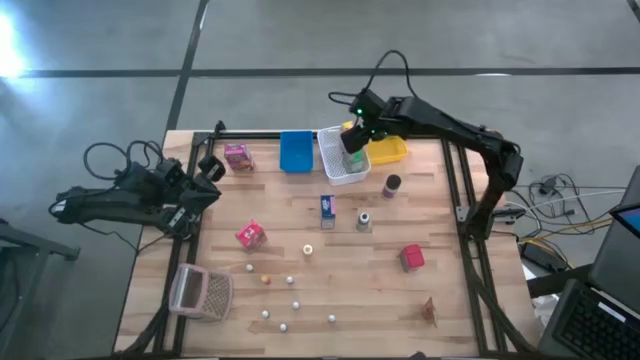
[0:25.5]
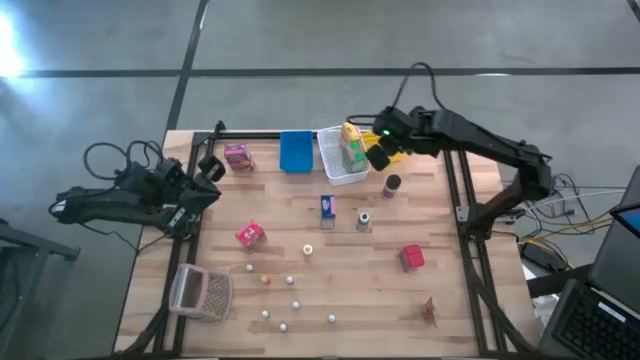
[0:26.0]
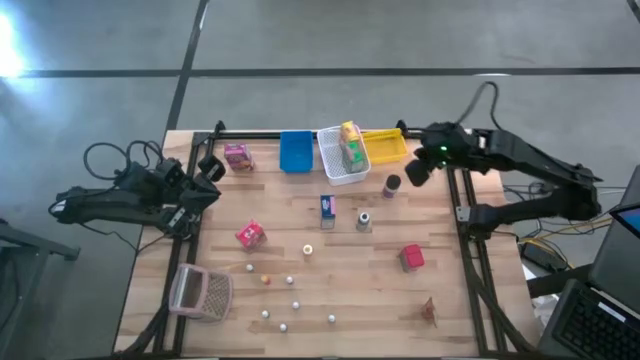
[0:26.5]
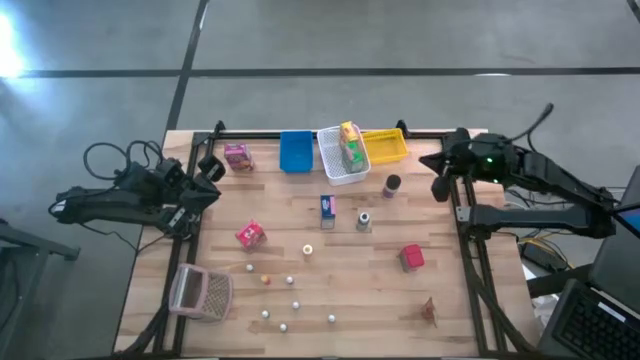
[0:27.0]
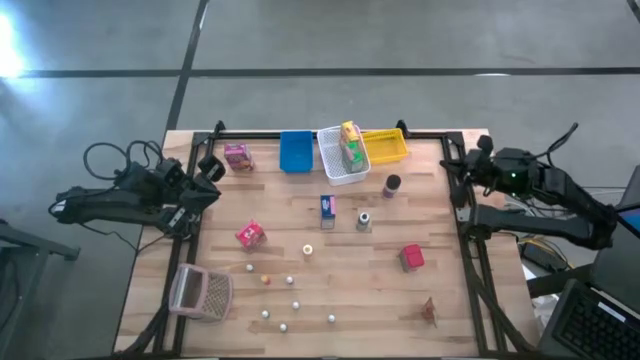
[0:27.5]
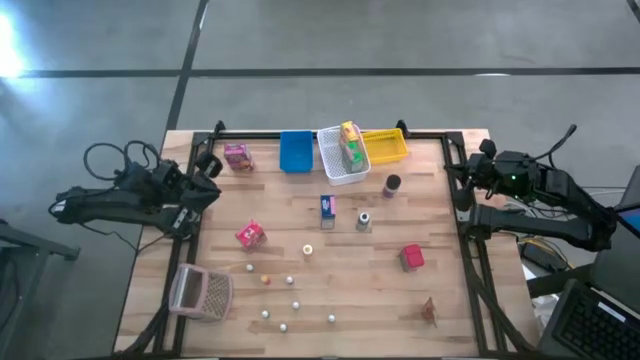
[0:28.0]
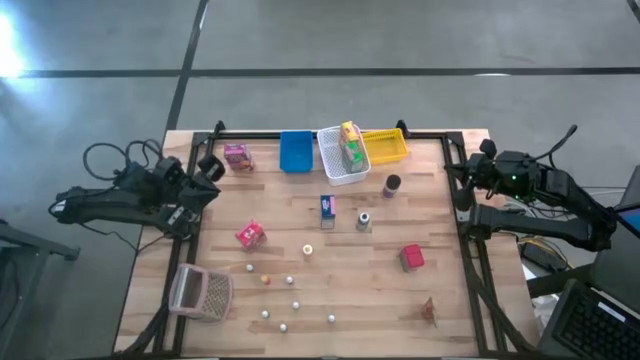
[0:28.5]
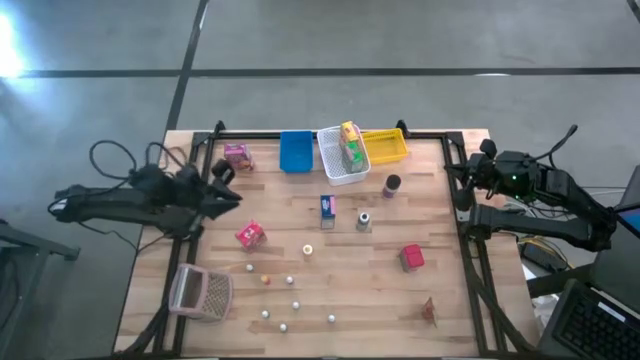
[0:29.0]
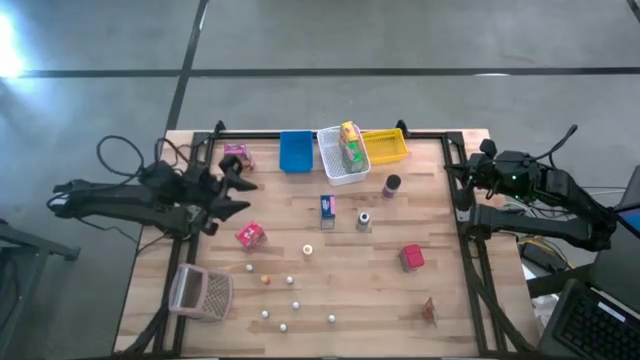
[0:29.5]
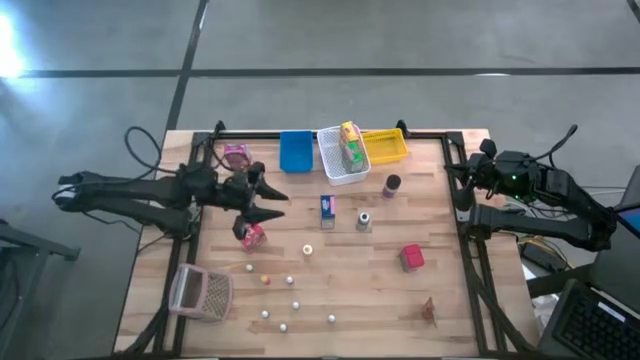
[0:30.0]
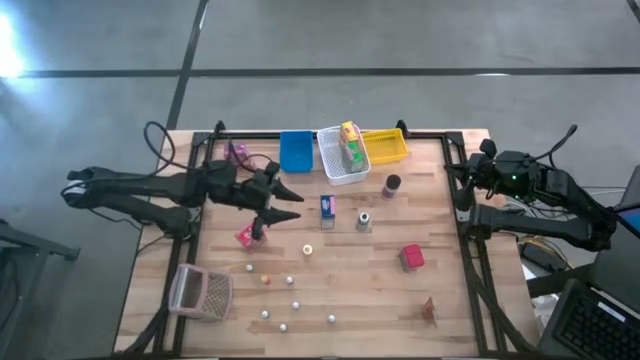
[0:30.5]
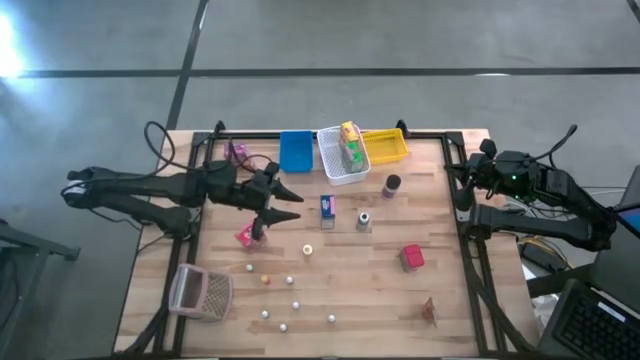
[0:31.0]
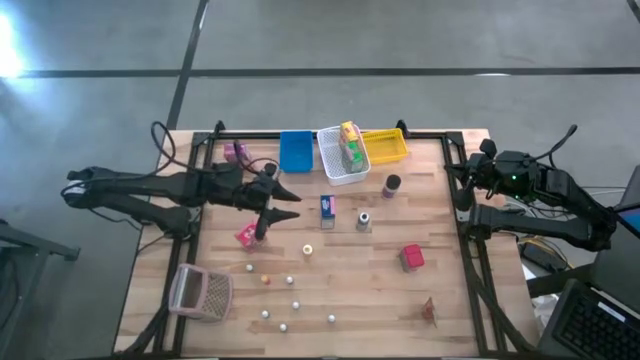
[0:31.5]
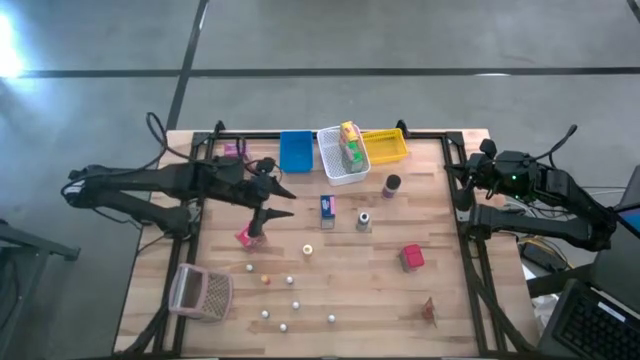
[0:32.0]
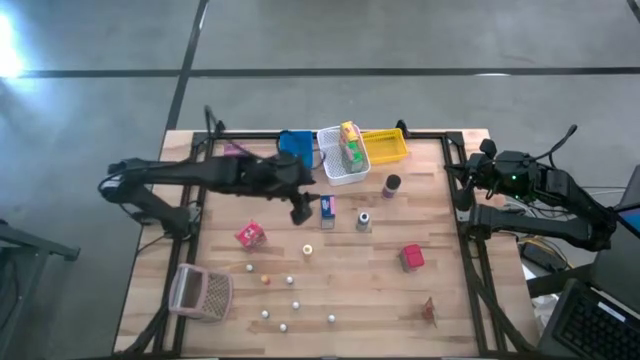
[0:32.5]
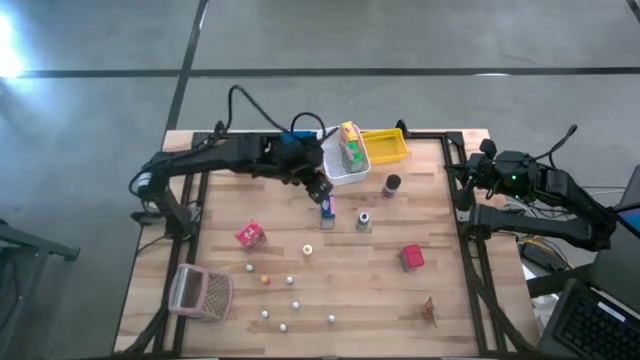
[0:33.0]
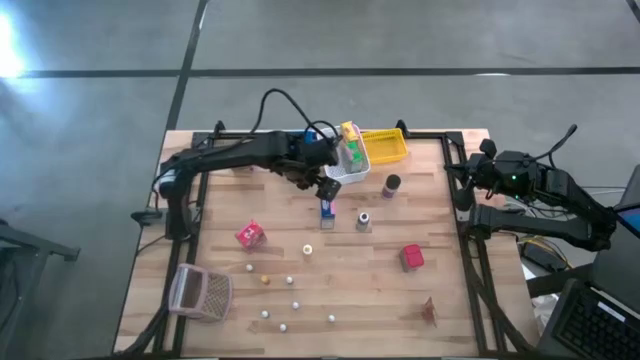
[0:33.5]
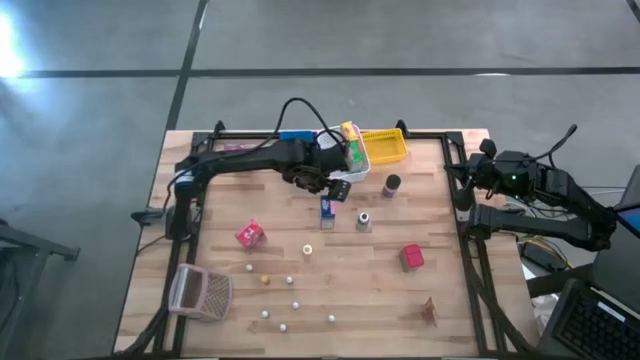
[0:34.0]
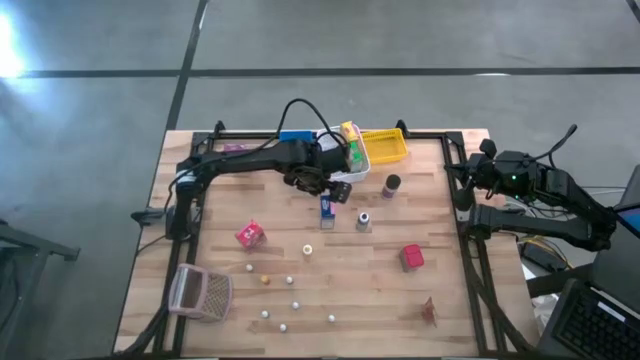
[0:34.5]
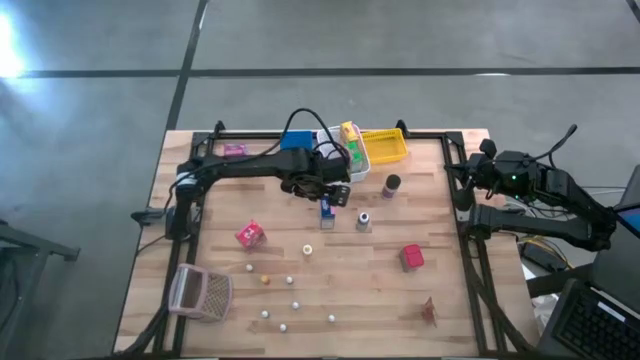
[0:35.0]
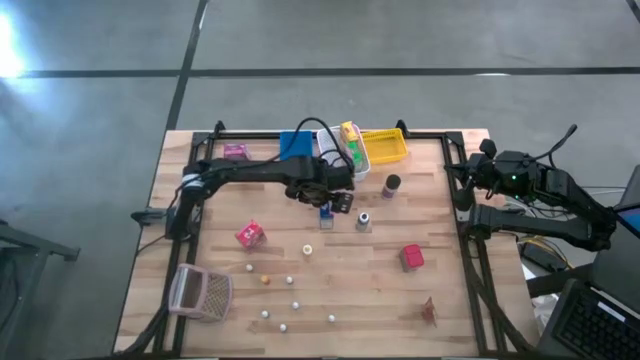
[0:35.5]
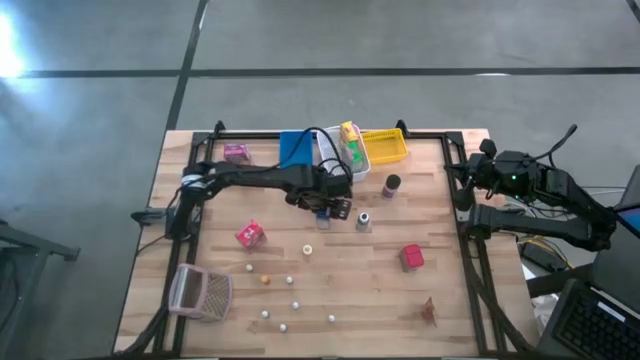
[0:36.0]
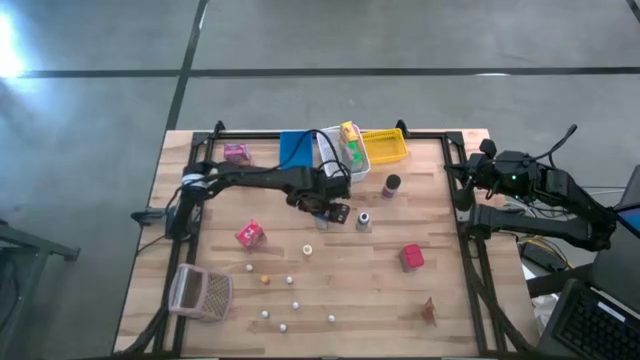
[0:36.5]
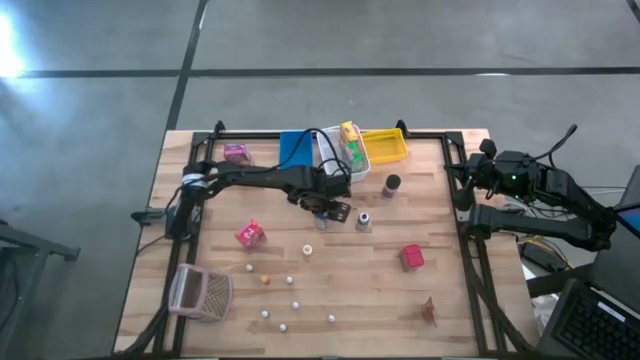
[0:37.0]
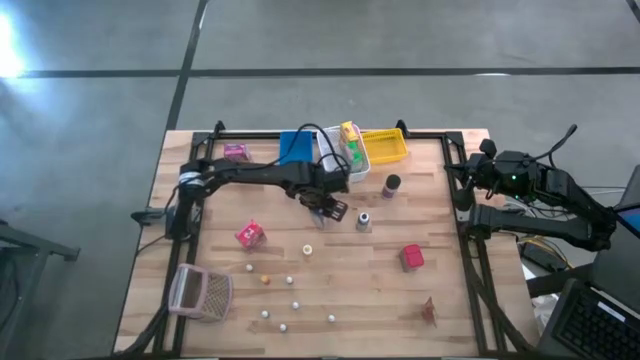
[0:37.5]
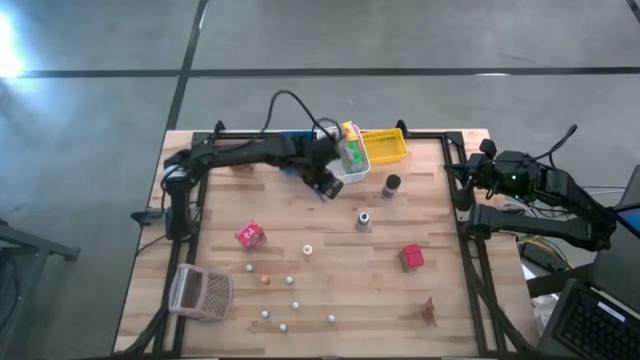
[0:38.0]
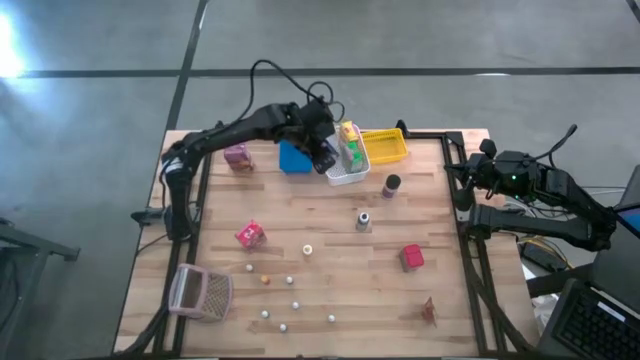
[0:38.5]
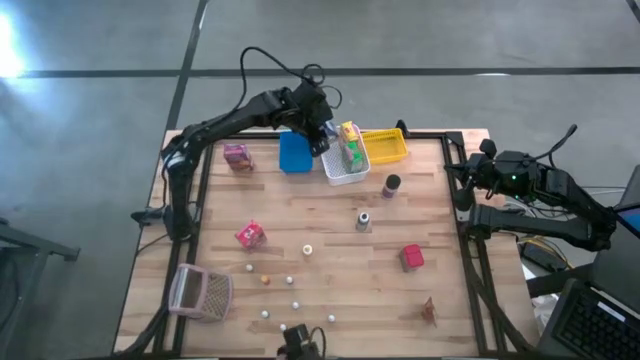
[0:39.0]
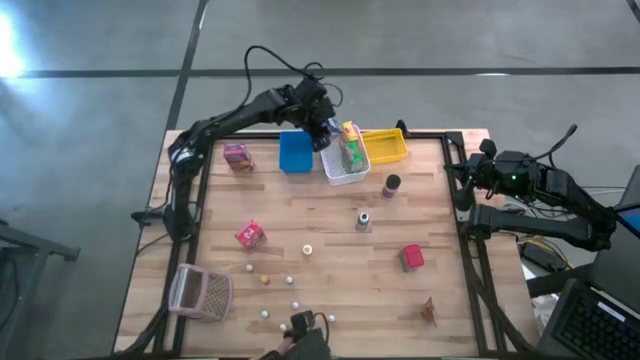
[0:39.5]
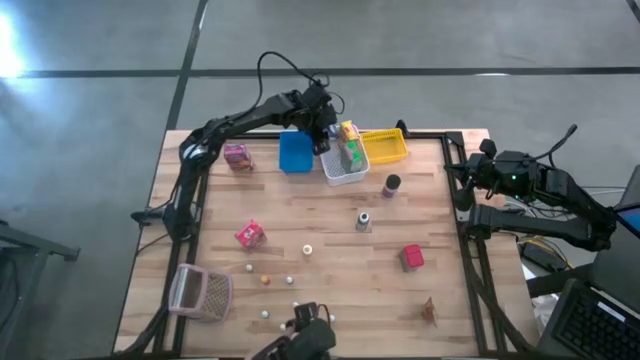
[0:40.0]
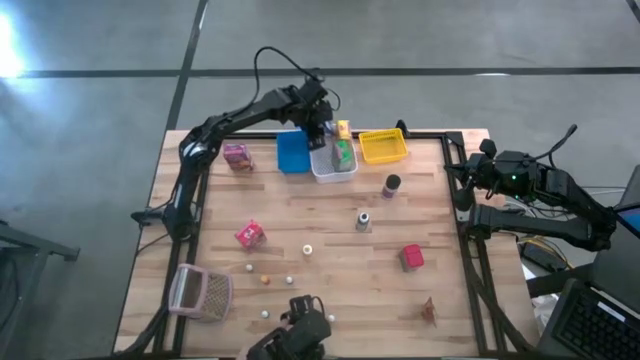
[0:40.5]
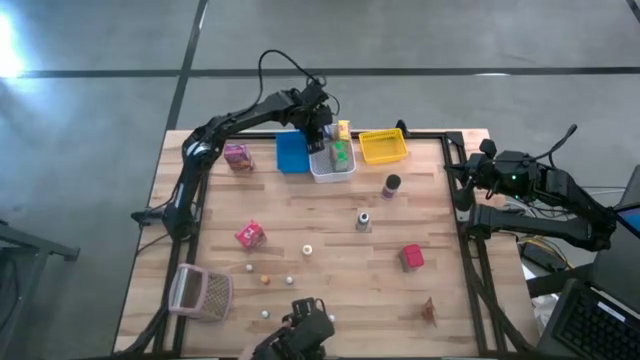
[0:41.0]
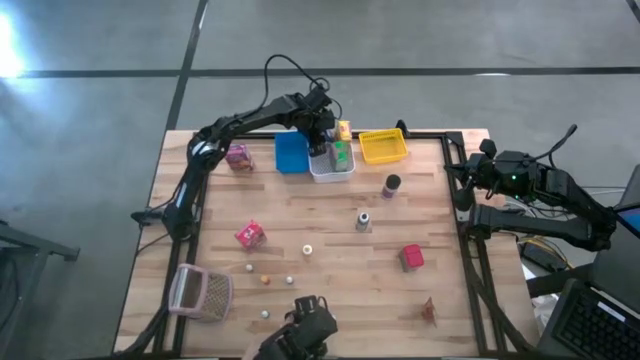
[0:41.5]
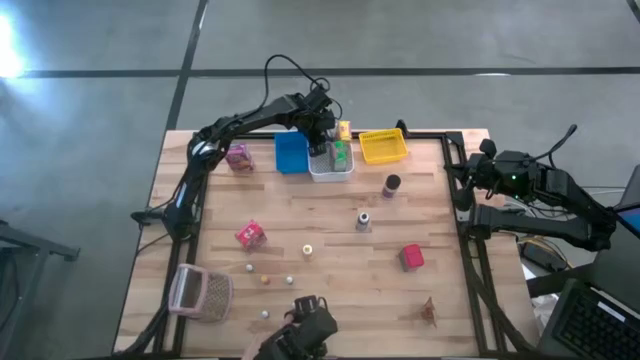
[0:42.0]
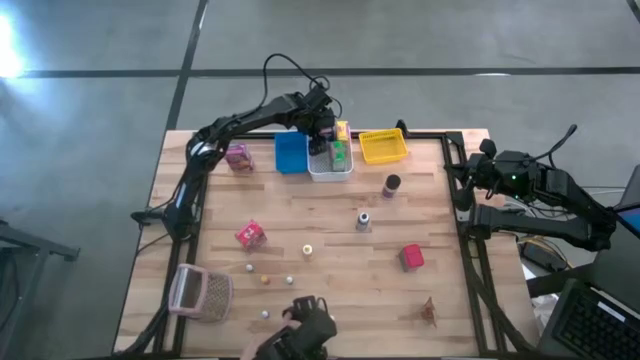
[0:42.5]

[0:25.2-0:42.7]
Task: Pick & Place Kitchen Items
Put the blue cereal box into the white bin

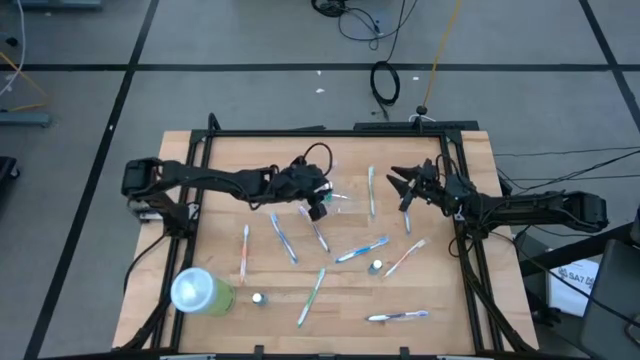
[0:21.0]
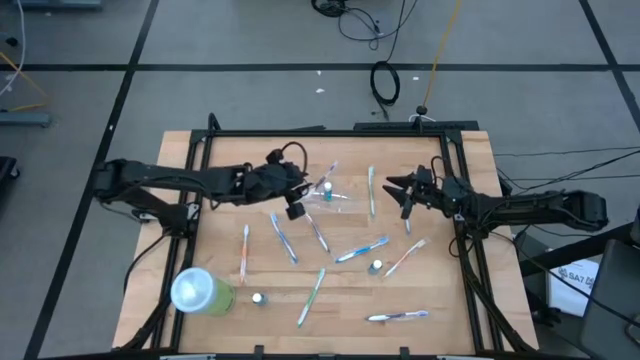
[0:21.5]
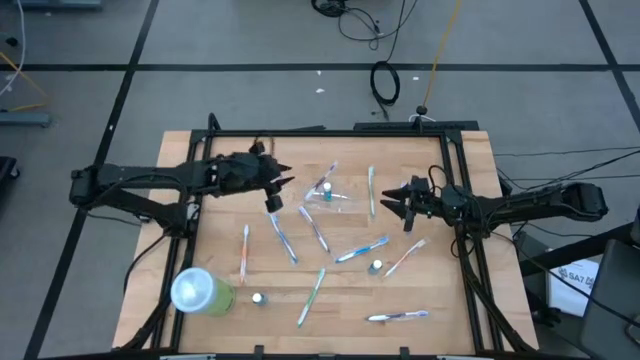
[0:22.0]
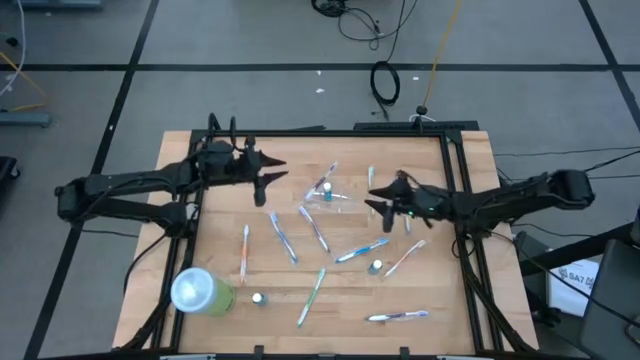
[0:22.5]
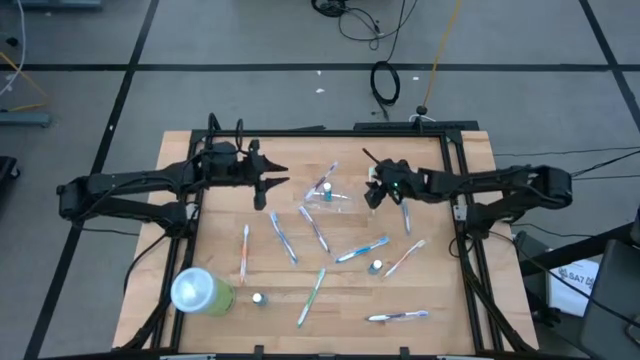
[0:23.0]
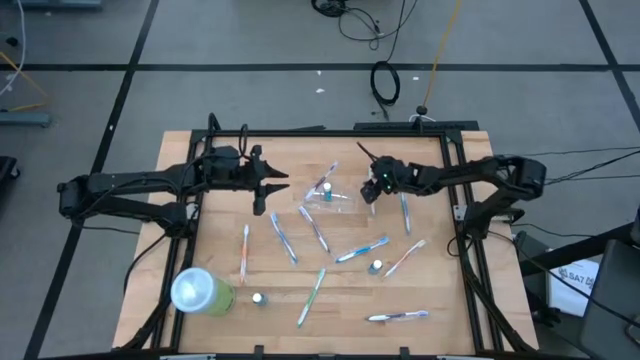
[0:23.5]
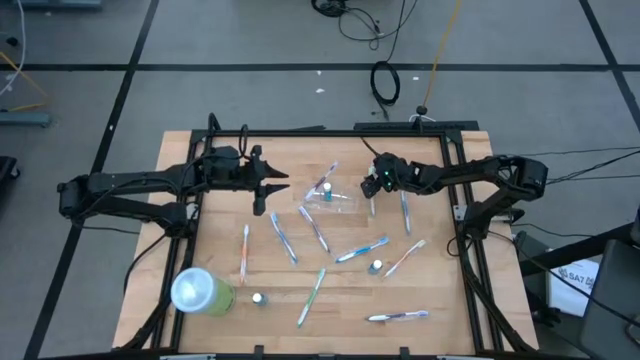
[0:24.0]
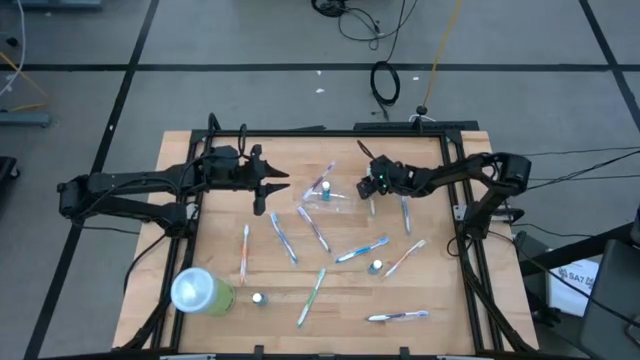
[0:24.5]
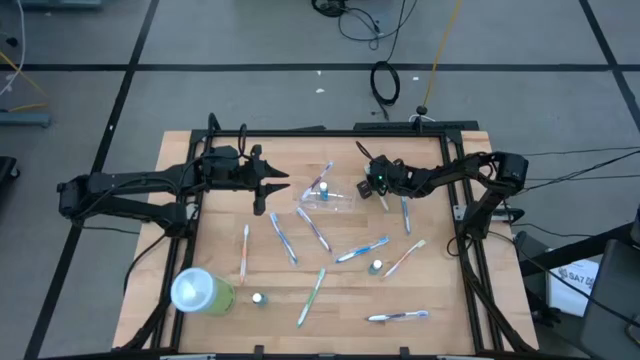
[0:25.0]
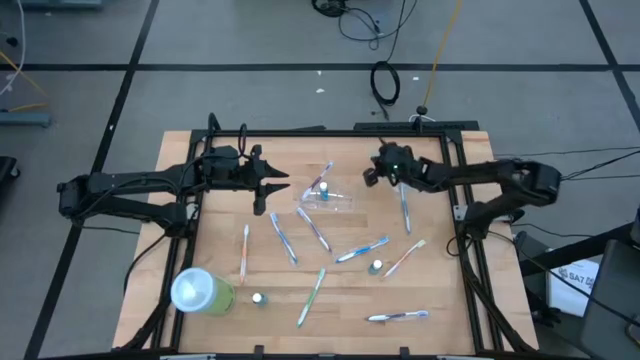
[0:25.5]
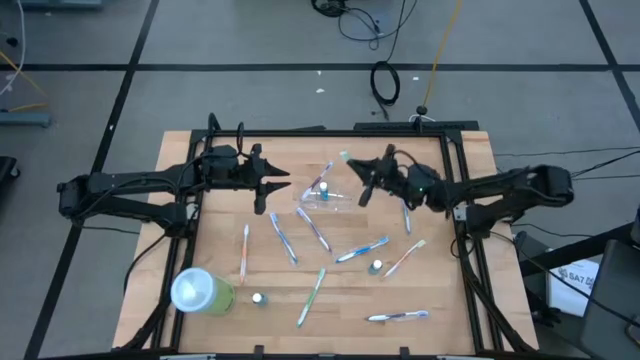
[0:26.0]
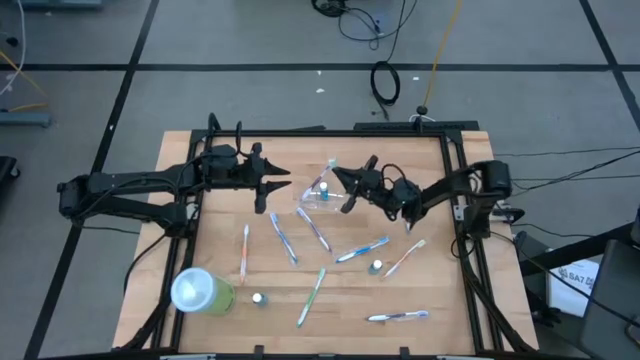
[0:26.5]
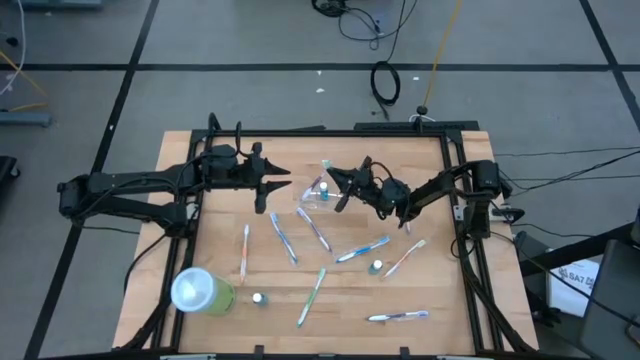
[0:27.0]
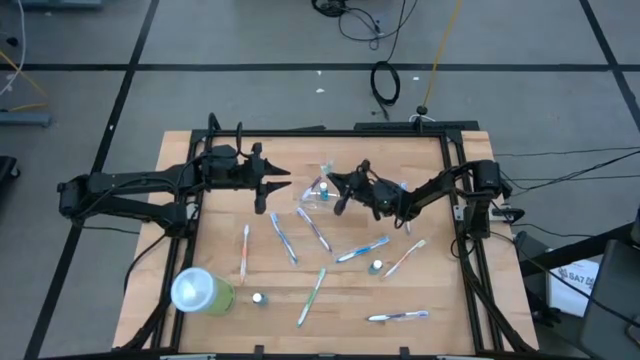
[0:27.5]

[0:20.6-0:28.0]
Task: Pick & Place toothbrushing station
Put the top green toothbrush into the transparent organizer
